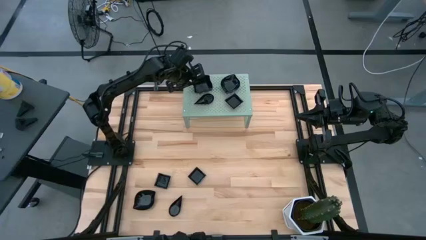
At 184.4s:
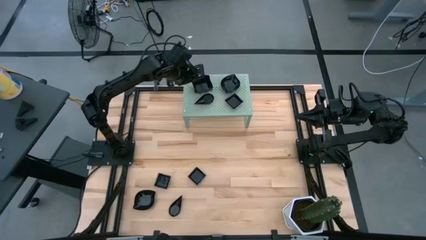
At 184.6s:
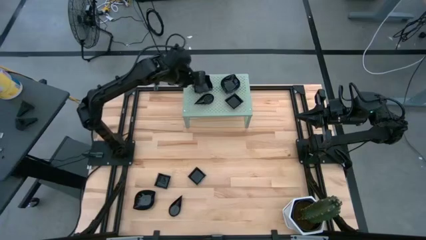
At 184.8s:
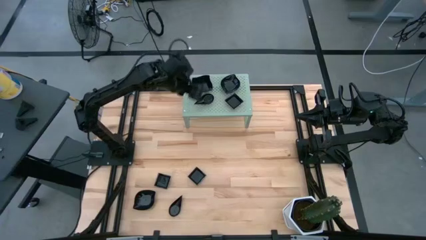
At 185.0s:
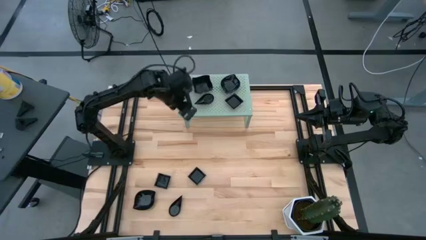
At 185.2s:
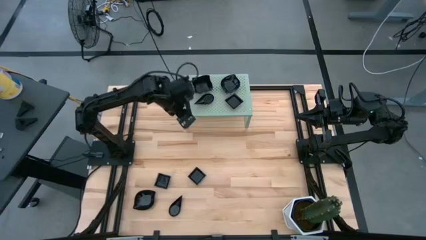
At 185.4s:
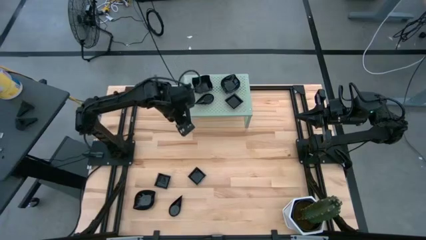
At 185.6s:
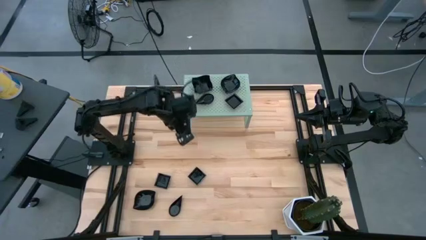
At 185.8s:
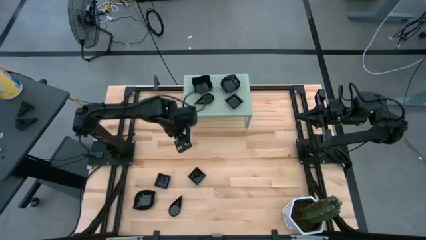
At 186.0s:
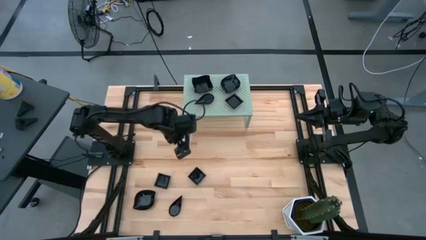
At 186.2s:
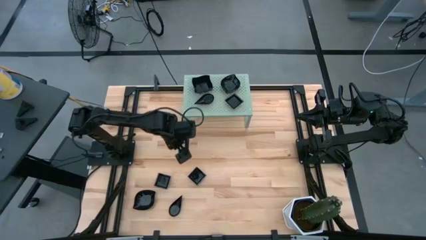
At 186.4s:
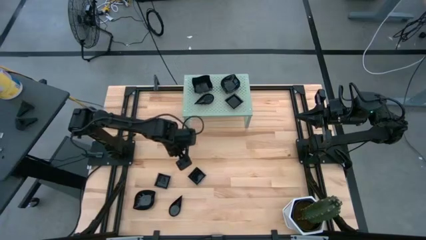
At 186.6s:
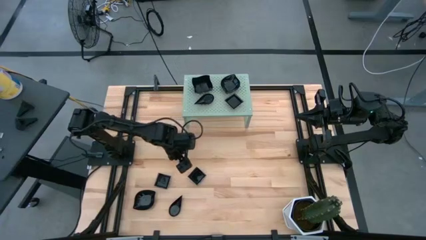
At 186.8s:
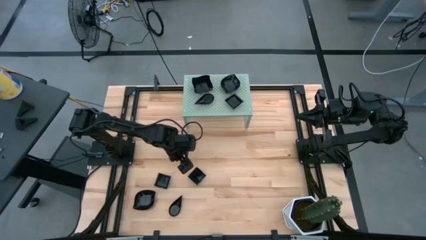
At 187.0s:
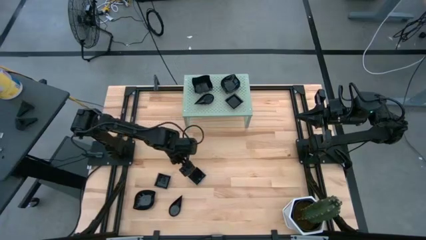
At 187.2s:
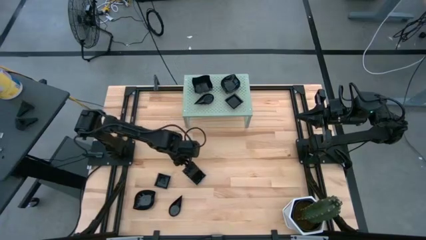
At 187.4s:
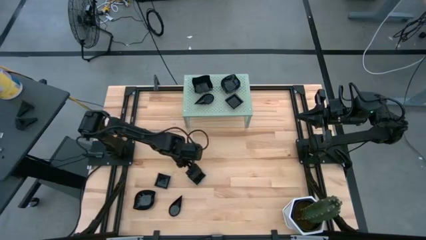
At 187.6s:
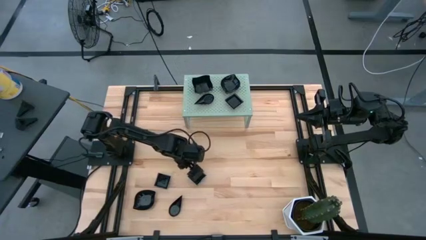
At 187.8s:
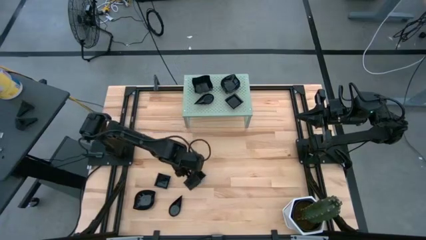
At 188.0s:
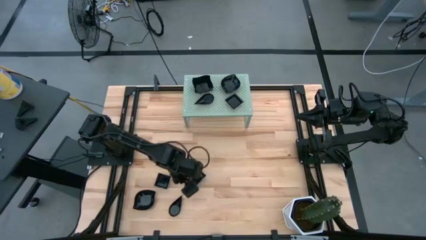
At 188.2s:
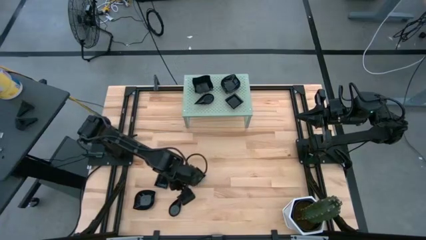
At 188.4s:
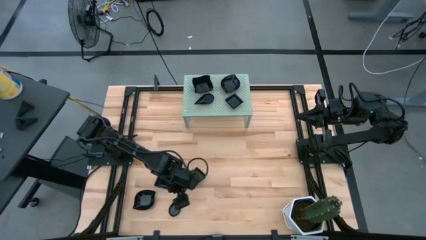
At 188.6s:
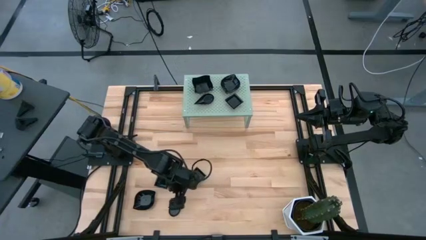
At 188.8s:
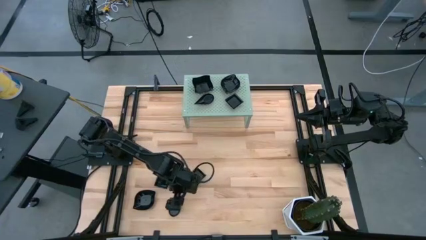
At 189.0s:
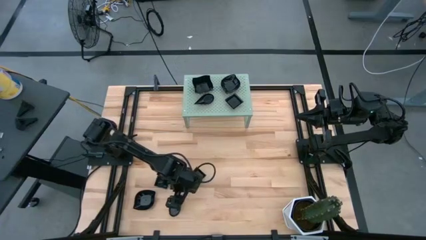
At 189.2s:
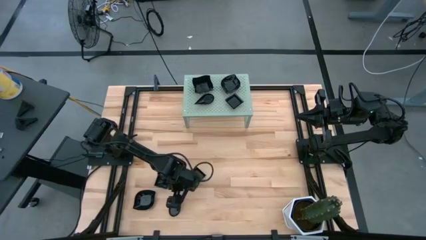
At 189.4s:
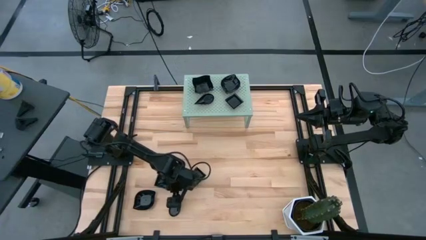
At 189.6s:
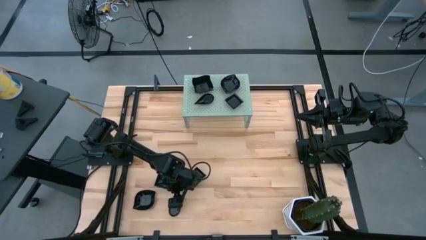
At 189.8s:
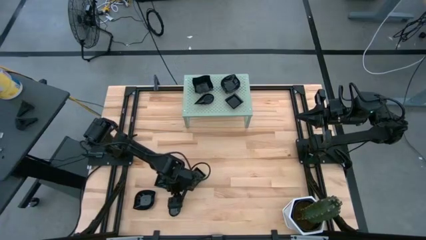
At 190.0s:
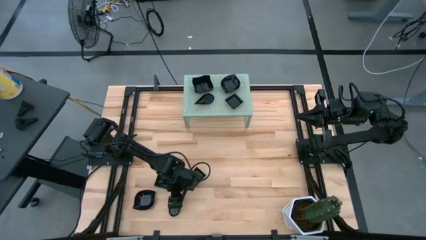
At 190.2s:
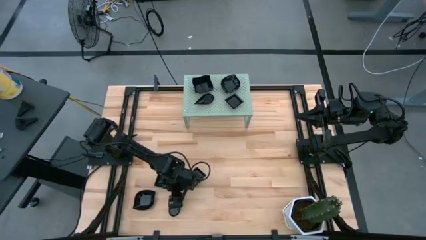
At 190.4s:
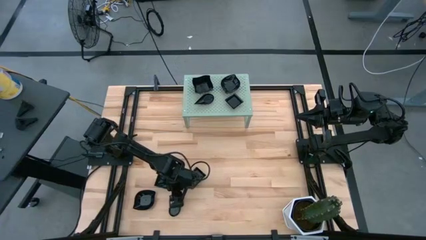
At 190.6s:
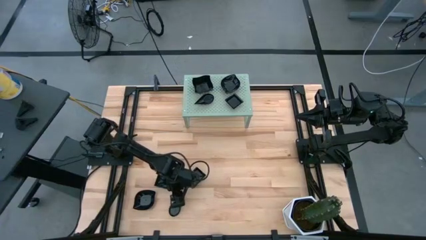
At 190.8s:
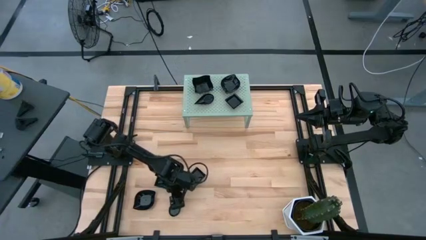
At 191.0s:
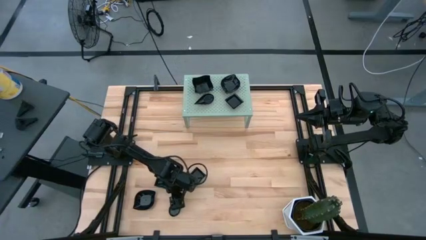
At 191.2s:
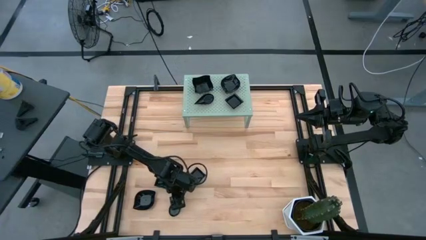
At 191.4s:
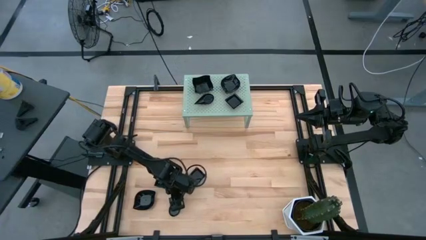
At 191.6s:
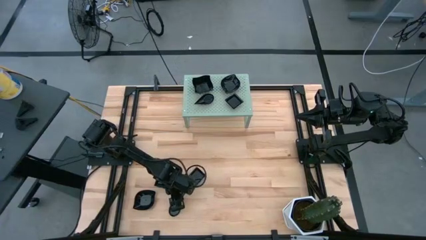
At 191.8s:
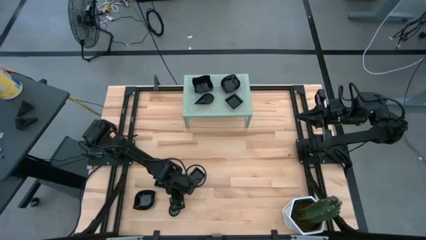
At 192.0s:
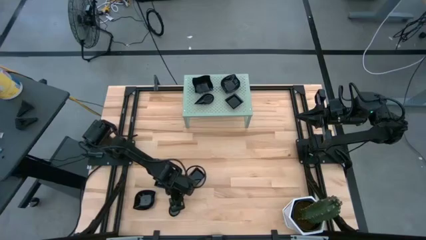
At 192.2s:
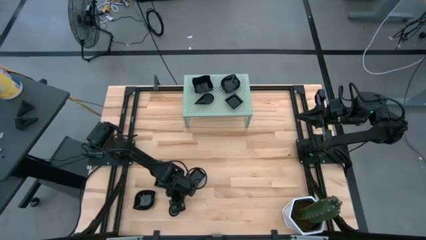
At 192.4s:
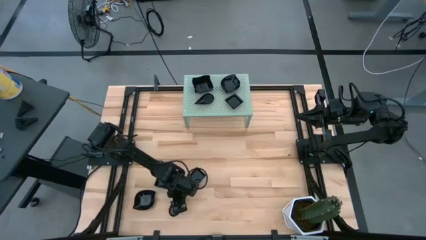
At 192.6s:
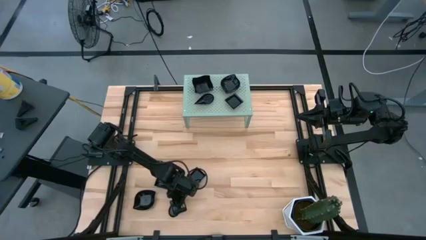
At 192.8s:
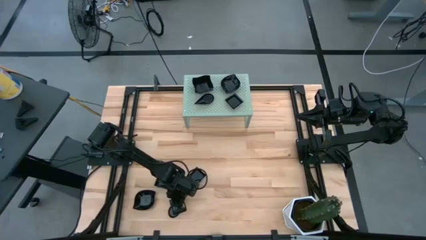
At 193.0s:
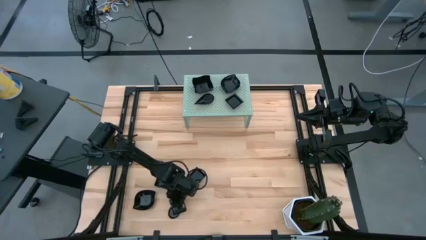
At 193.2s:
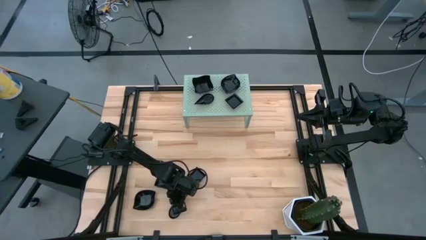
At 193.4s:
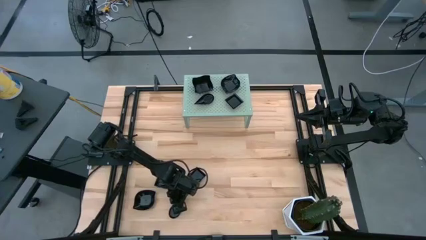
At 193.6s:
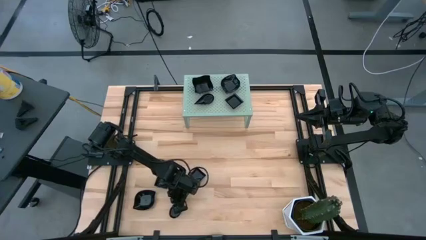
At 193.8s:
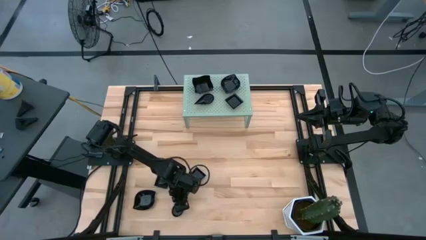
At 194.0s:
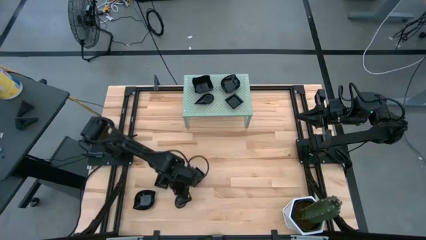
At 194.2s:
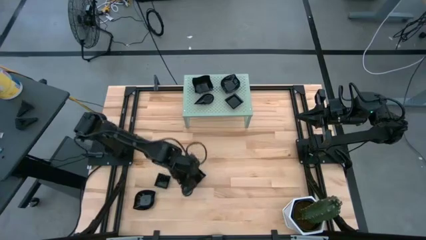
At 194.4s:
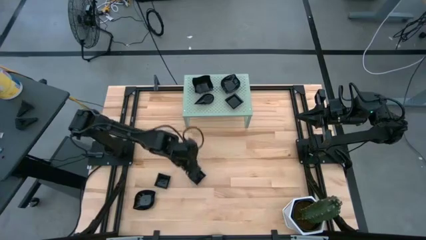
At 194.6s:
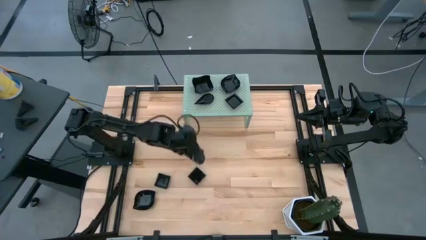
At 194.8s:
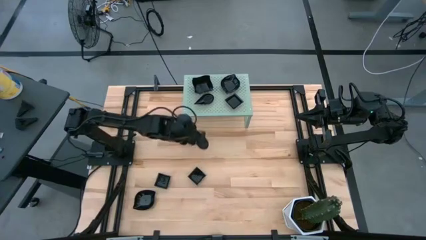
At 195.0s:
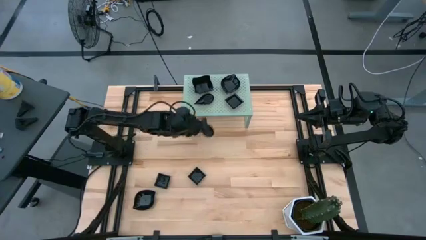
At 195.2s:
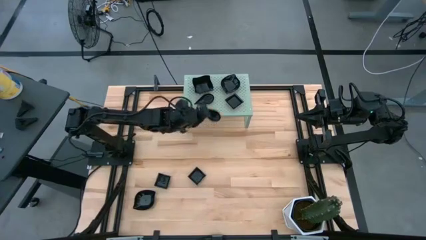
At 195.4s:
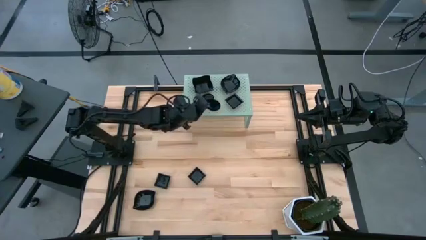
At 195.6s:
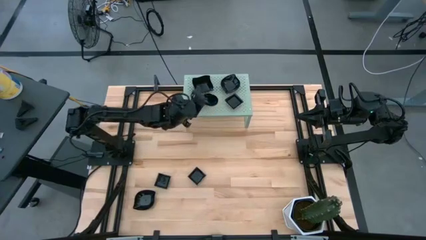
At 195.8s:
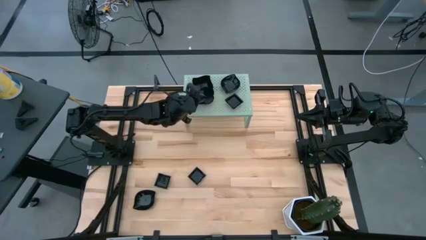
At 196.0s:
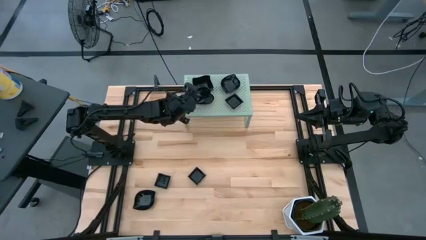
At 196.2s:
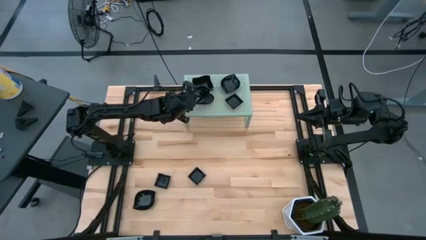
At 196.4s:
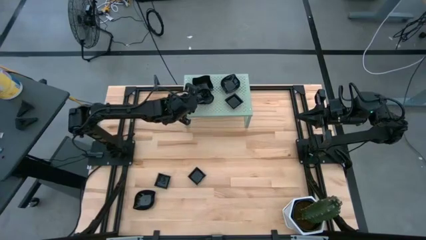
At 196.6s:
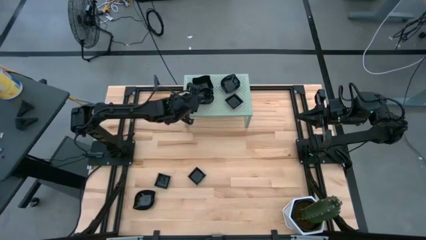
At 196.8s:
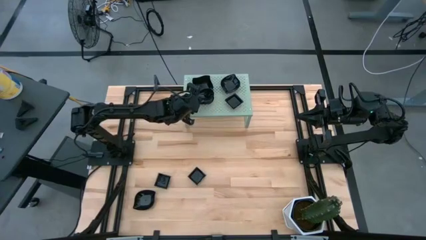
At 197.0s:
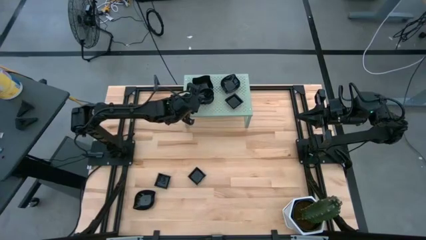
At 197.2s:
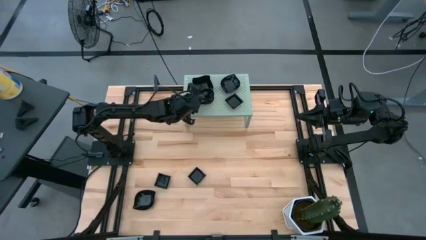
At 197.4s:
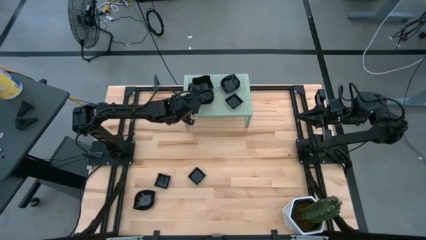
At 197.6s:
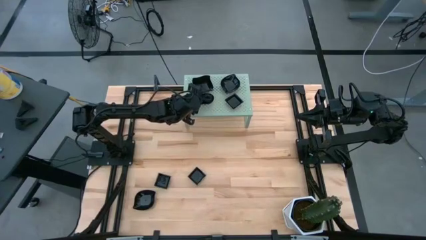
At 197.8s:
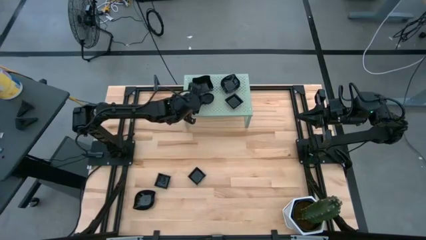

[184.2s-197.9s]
Task: Pick & Place Mini shaped plates
Stack the drop shaped plate on top of the drop shaped plate on the shelf

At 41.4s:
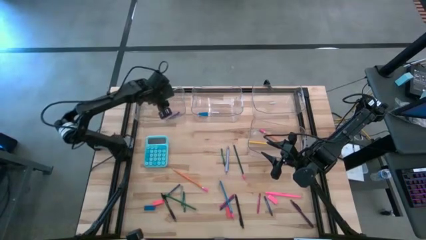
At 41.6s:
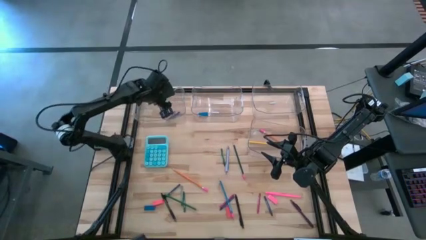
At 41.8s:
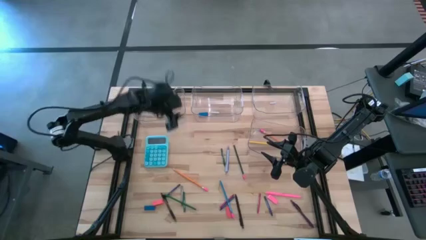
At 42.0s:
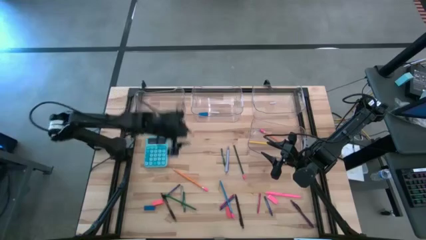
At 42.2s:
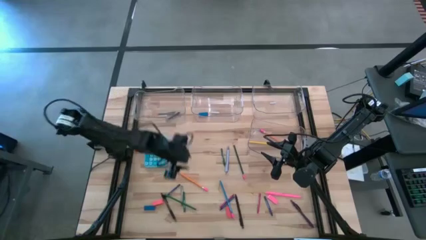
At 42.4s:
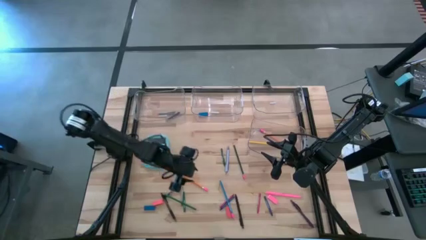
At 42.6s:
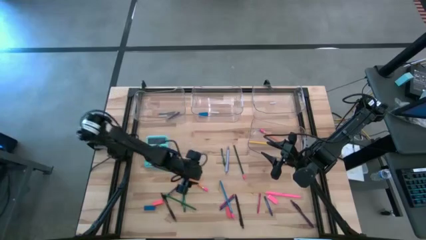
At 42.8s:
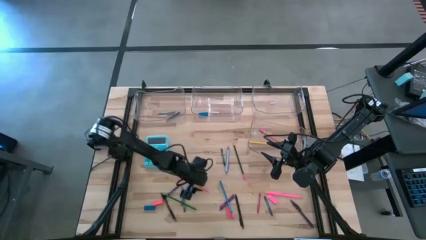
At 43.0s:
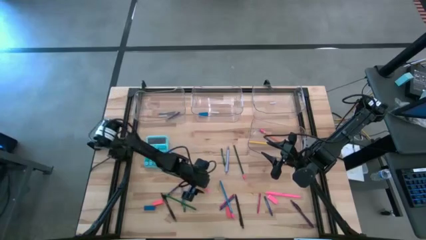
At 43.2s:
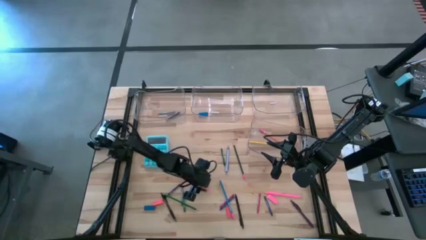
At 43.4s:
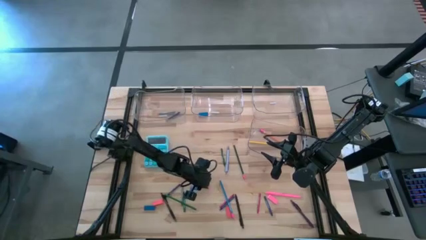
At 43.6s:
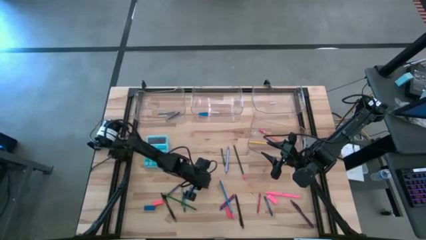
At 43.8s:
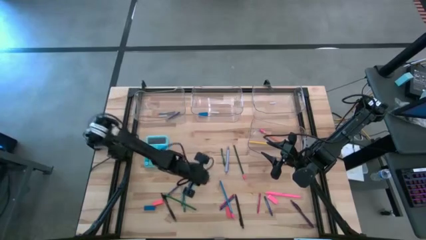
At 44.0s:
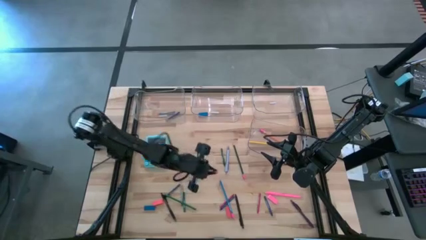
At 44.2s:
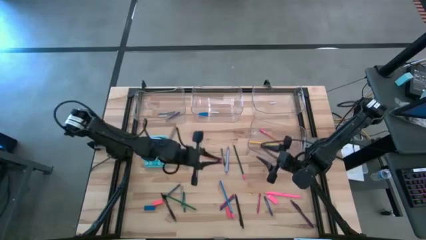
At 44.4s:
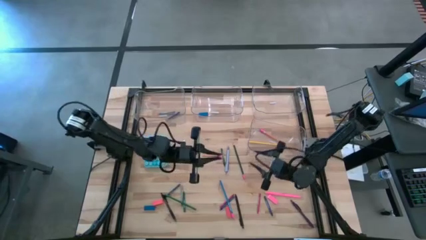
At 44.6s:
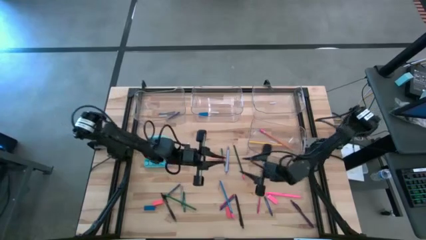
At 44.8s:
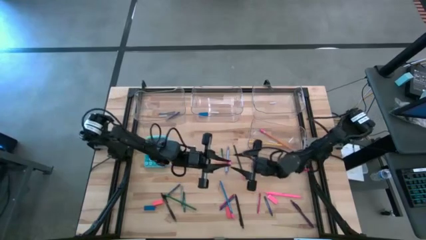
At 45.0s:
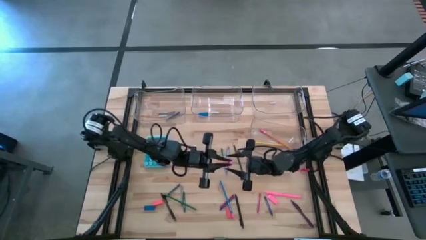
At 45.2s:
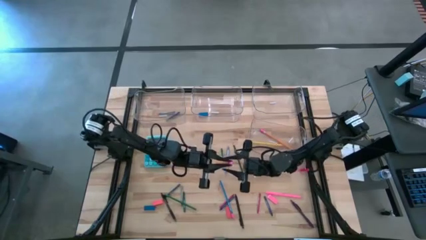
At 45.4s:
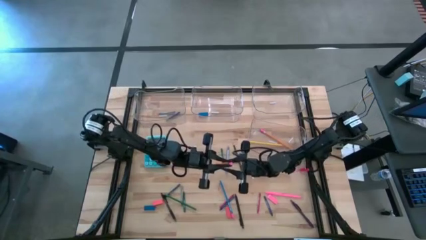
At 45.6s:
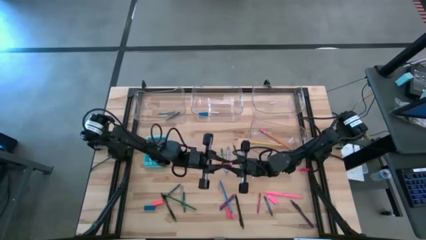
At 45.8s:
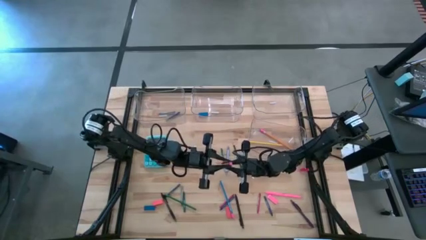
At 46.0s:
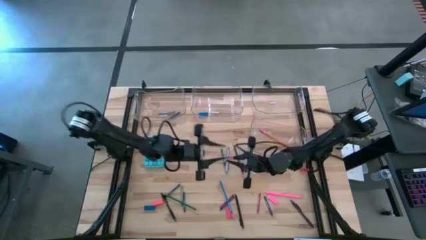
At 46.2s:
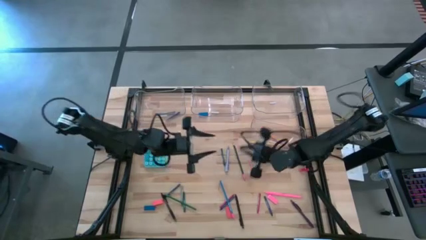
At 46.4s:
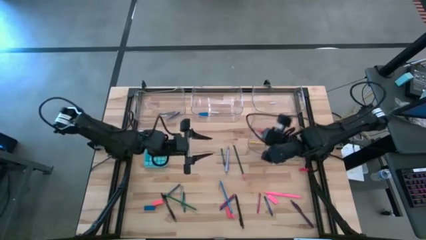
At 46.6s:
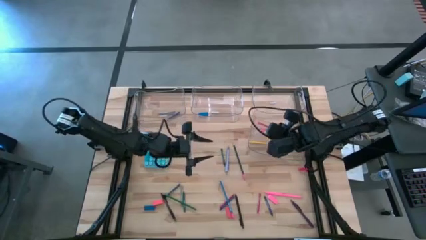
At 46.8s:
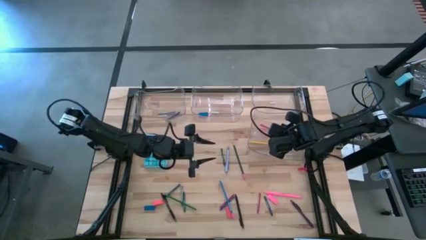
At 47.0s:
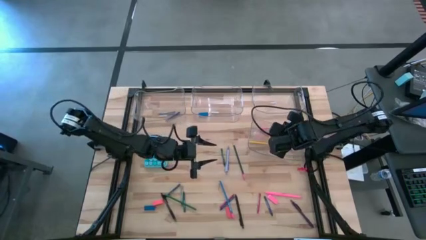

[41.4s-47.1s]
Task: Sort crayons/erasers/pens/pencils in bins
Put the orange pencil into the bottom transparent bin
